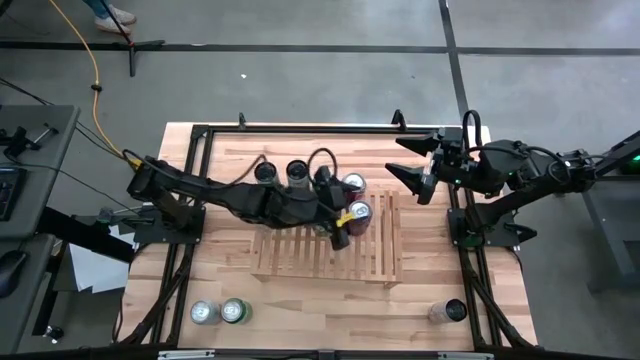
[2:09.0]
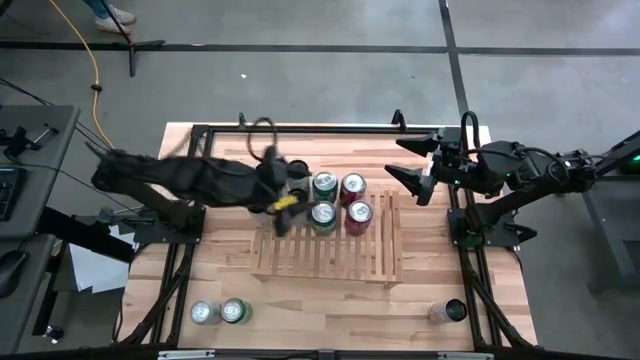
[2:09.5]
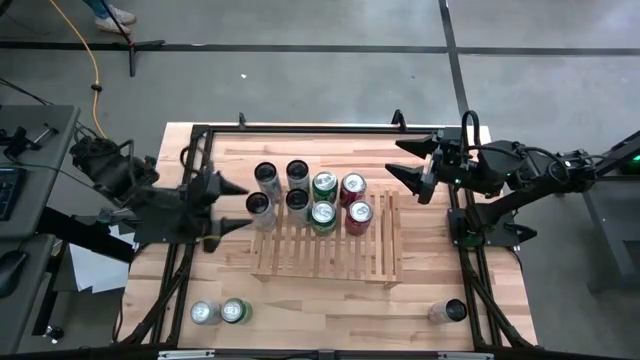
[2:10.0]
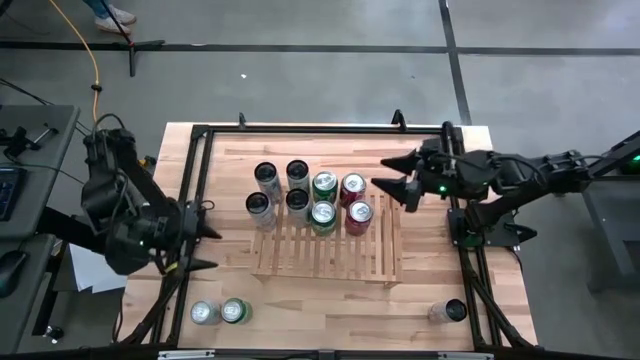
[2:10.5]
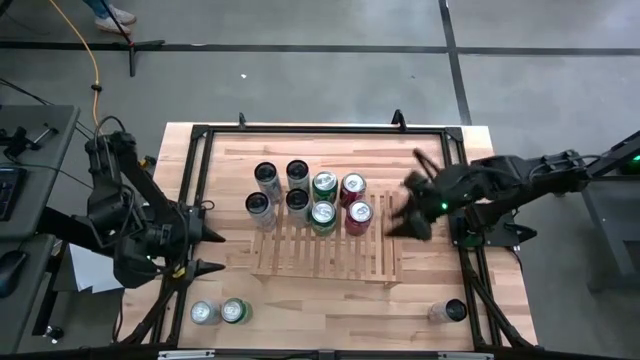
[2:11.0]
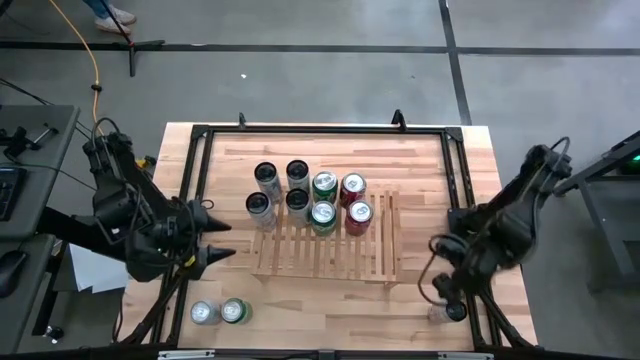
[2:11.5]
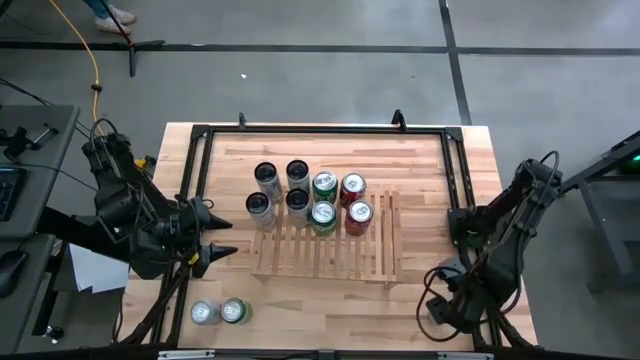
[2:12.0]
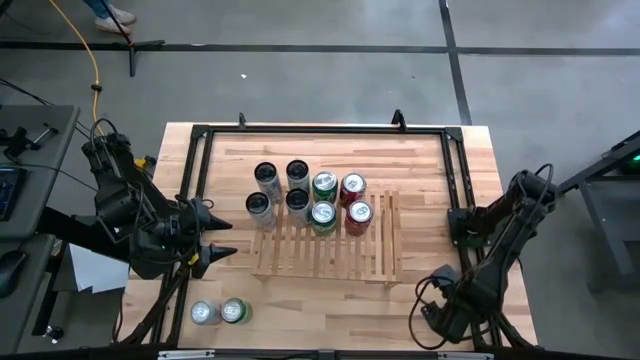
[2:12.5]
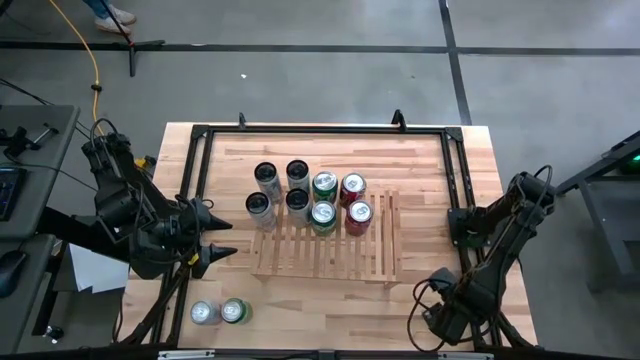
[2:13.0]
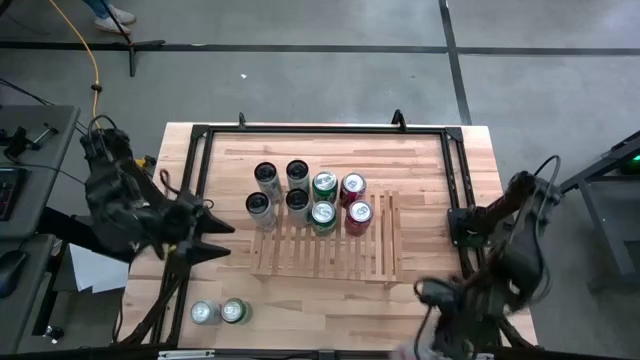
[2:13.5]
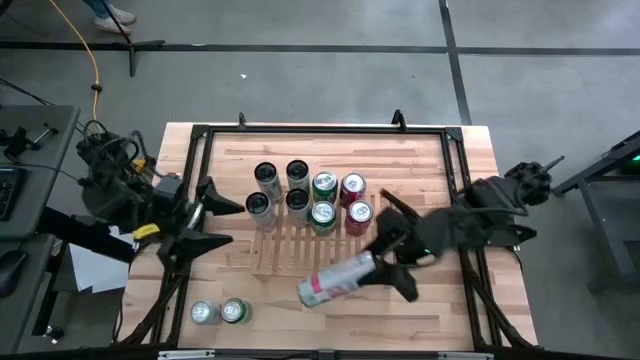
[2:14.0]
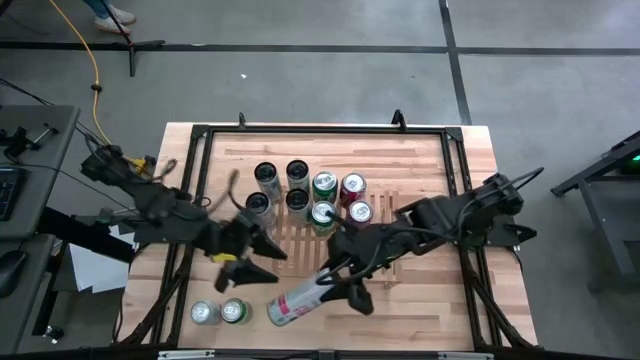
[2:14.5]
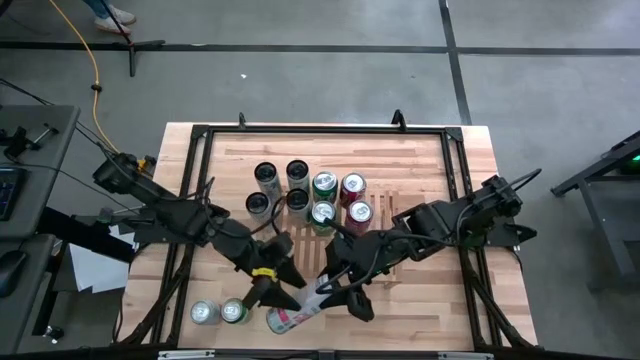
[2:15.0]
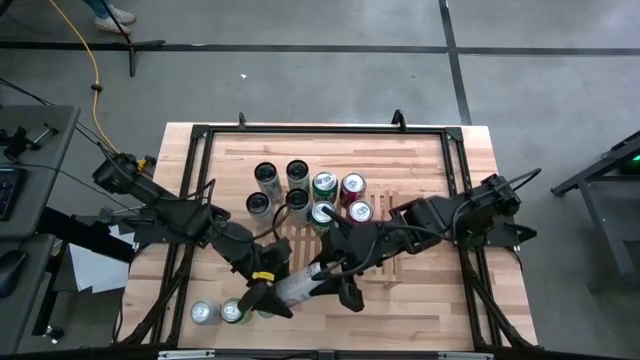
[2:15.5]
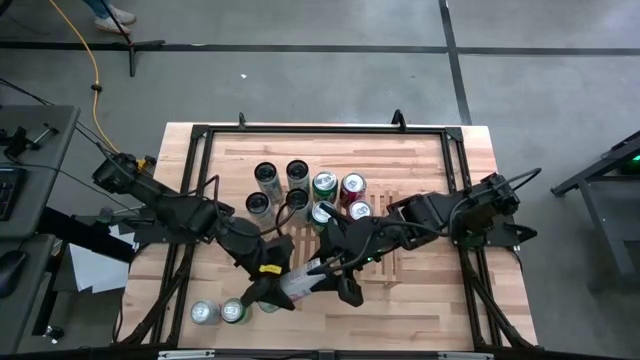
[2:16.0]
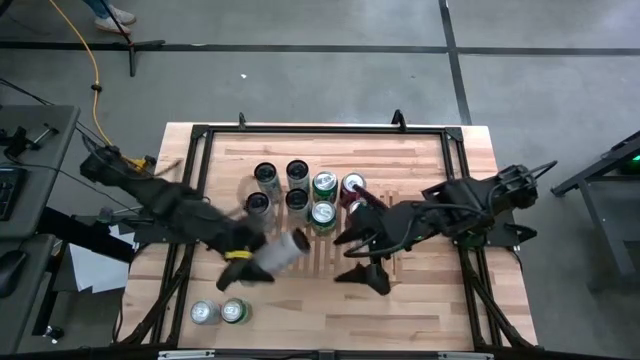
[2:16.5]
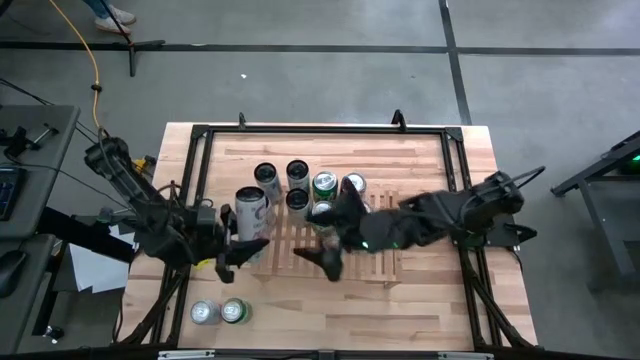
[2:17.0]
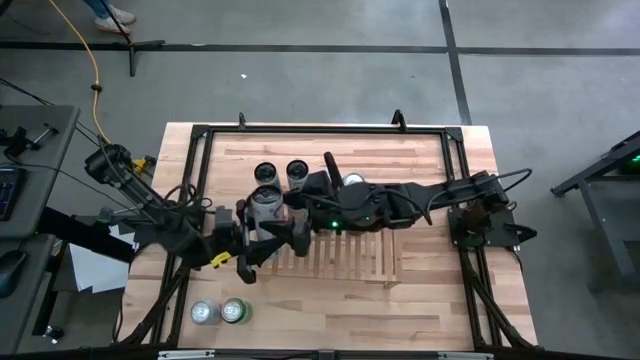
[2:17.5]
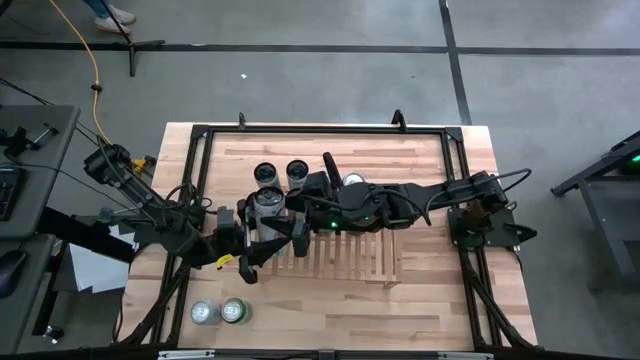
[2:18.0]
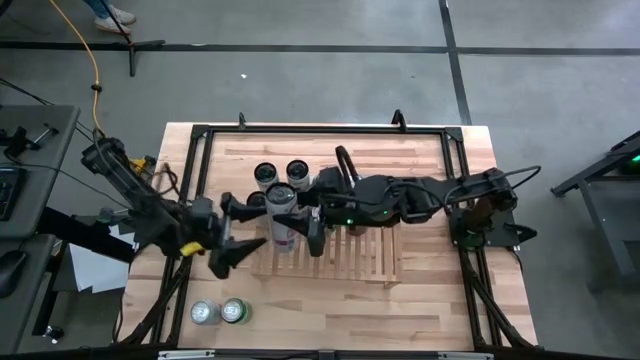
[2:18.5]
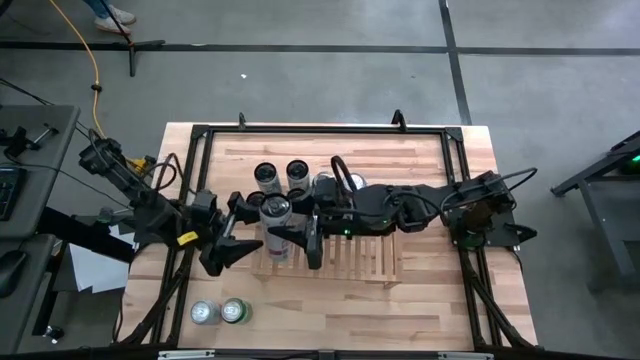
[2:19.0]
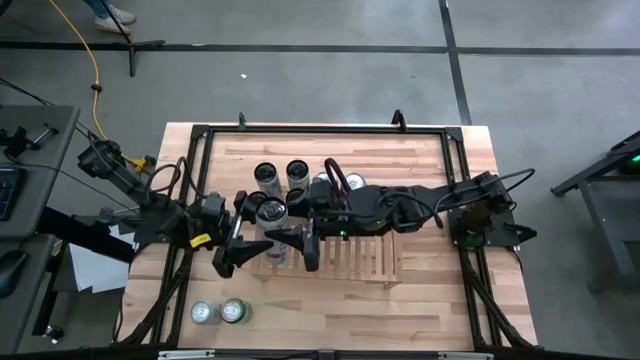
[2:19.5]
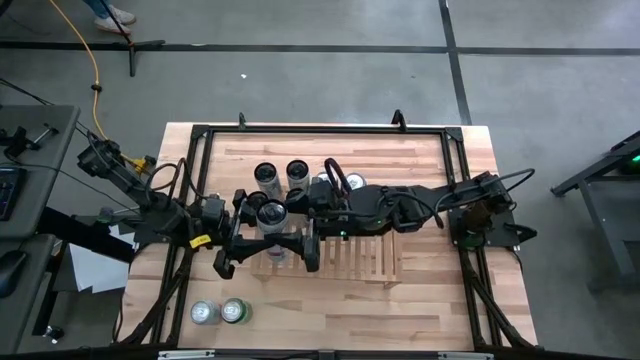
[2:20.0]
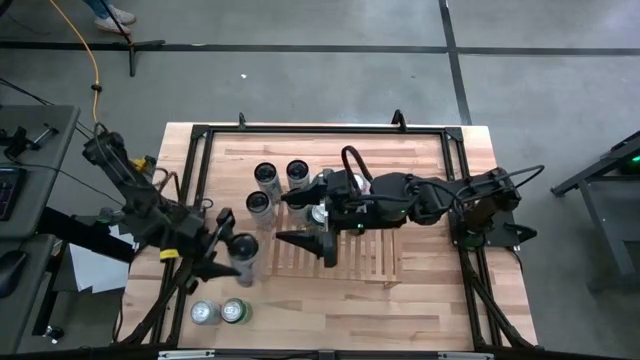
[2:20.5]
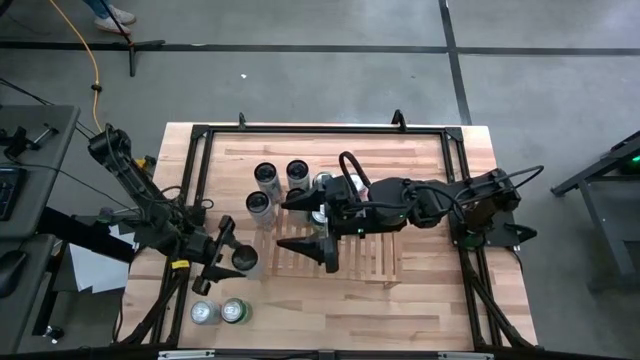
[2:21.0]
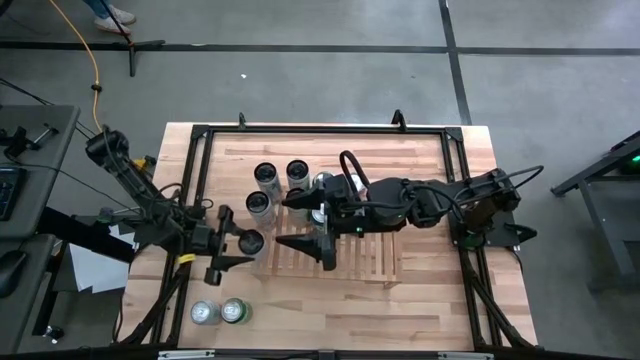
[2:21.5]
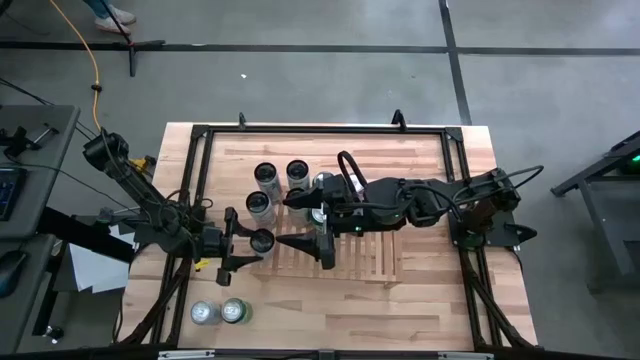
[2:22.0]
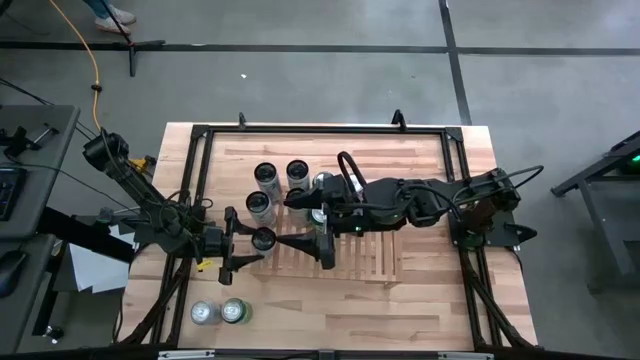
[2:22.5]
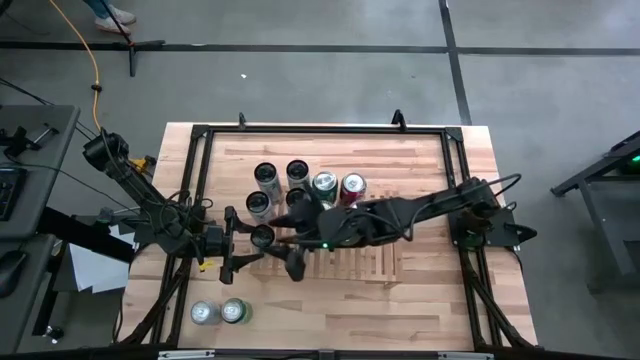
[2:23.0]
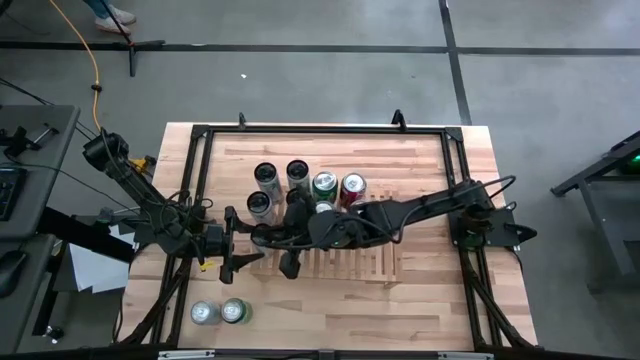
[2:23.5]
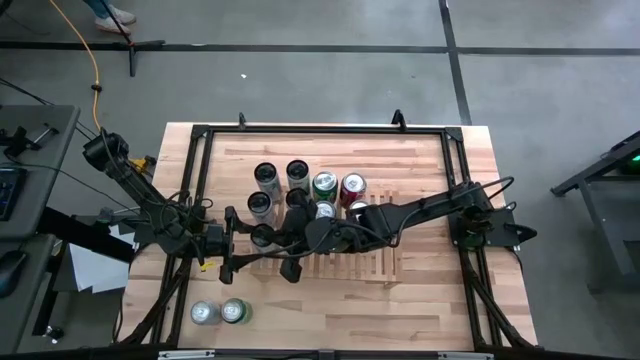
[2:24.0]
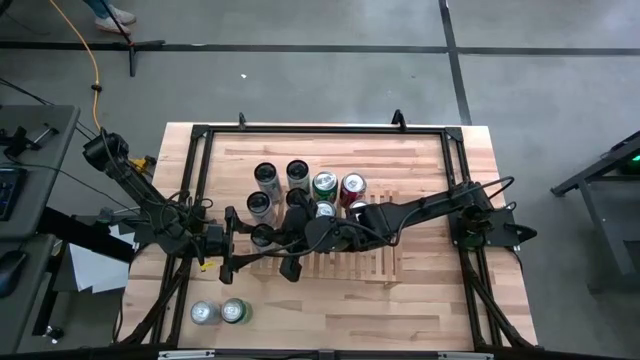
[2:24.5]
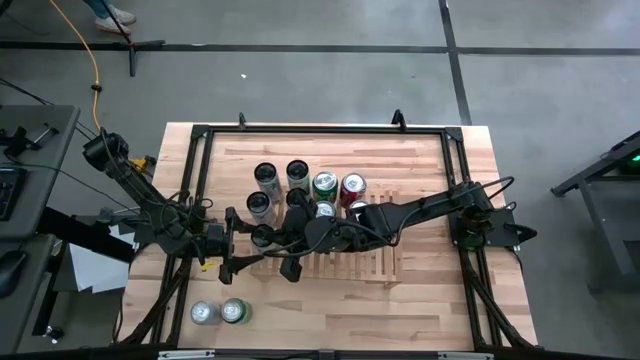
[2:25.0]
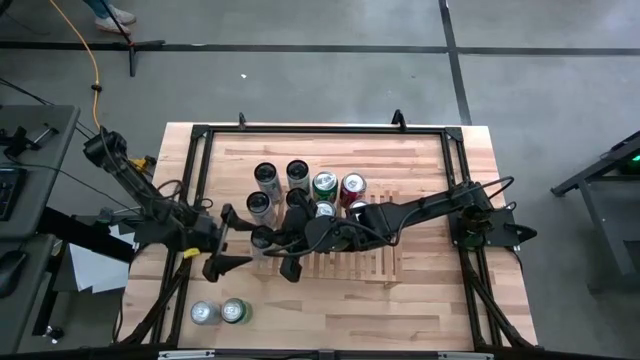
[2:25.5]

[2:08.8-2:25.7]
Task: Place canned beverage on shelf
Put the white pink soda can aligned with other white pink soda can on the shelf

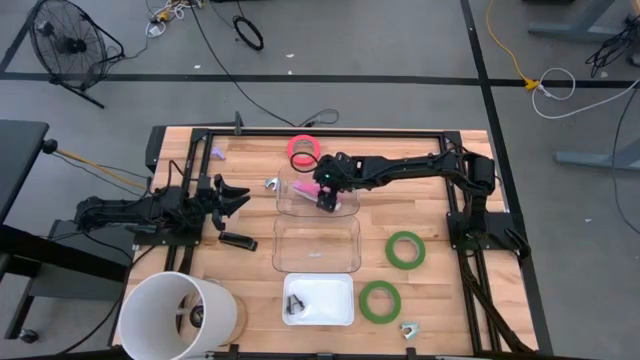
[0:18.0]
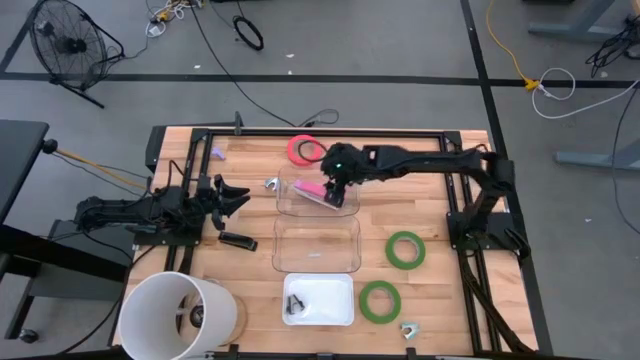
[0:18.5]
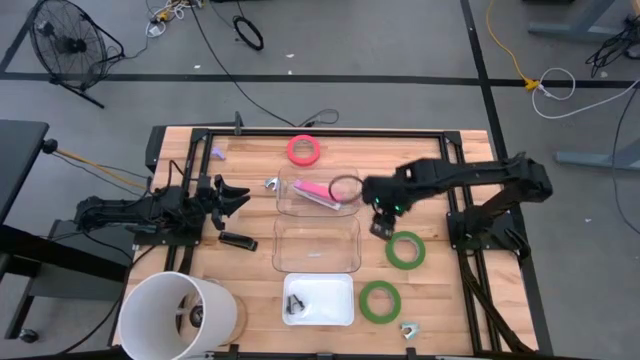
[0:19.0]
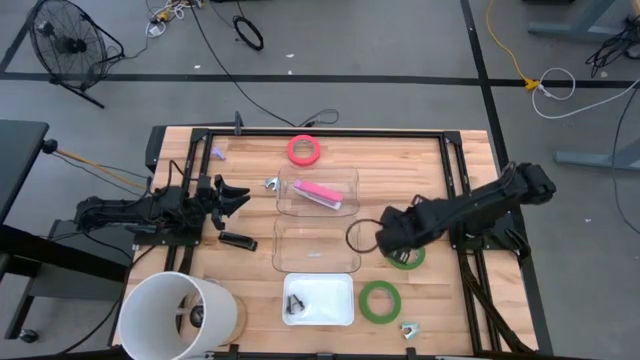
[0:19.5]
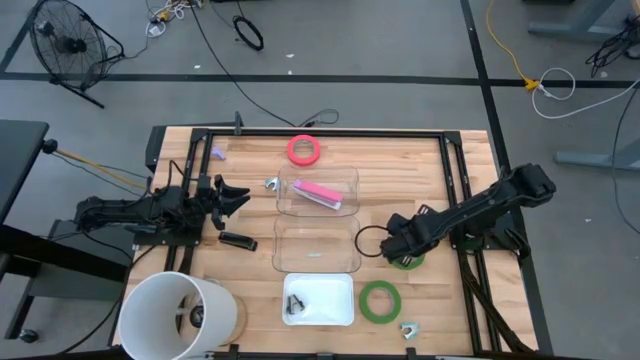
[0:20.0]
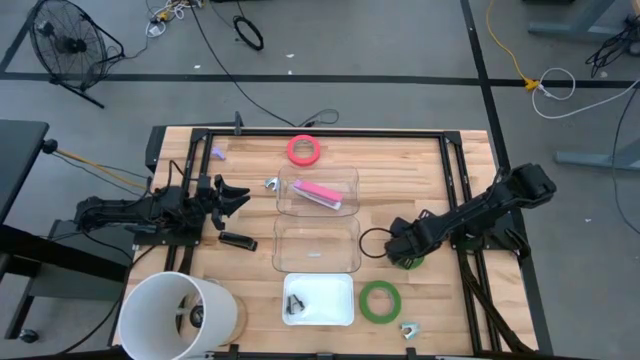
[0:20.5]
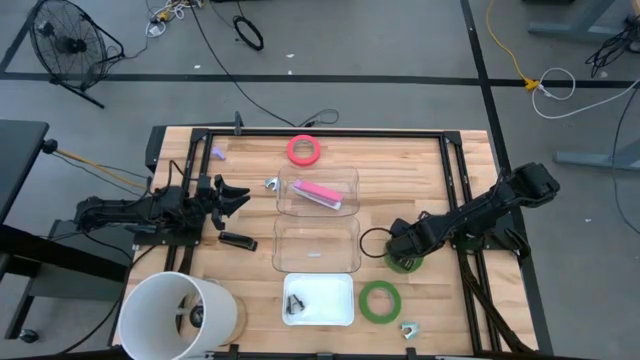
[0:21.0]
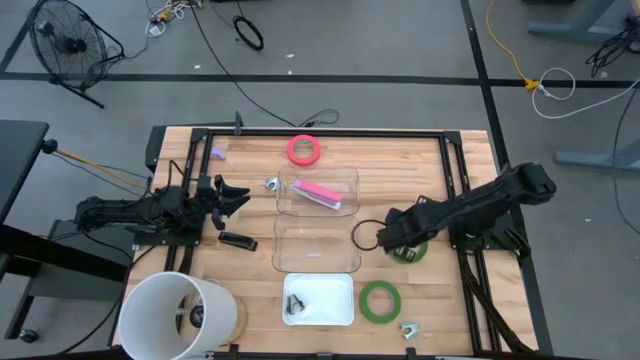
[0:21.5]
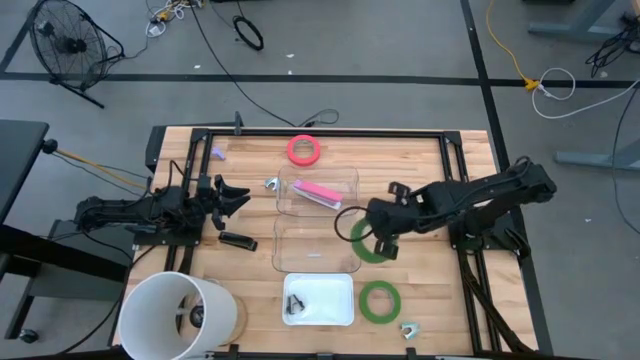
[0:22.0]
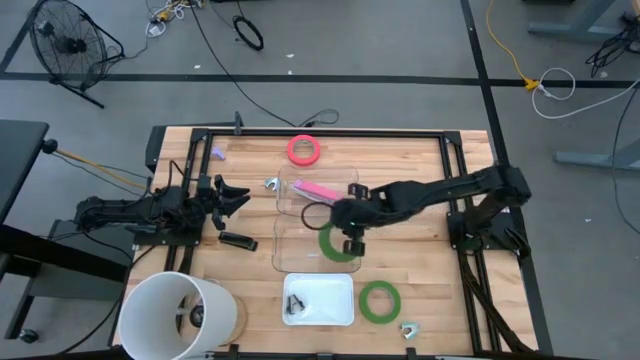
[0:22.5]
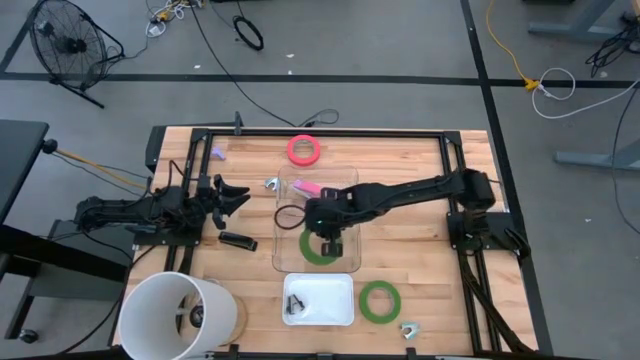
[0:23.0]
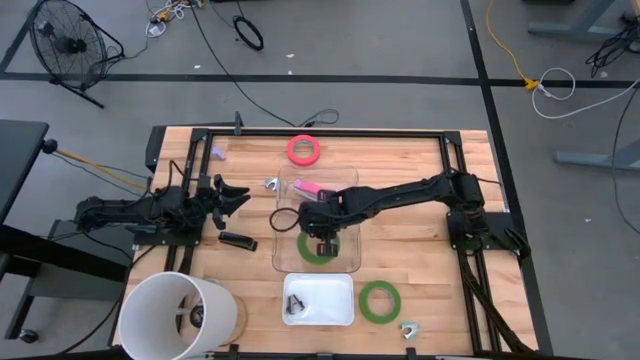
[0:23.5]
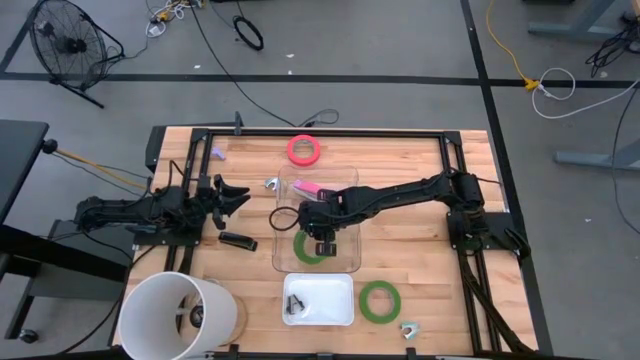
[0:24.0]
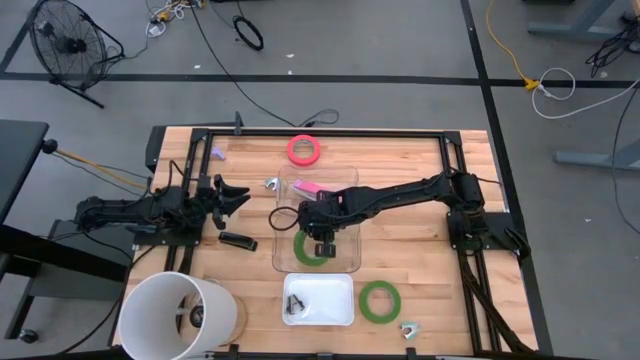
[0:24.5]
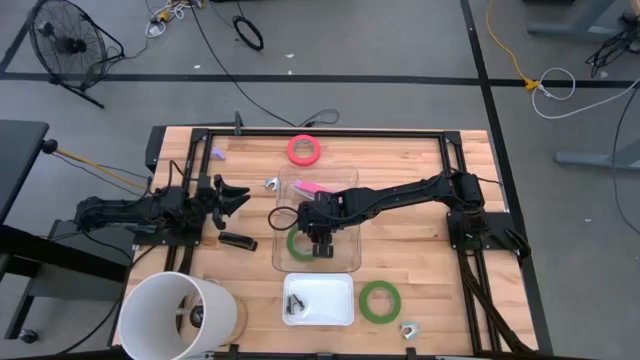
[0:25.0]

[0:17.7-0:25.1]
Task: Pick and place Stapler, Stapler remover, tape
Put the top green tape into the bottom transparent bin
